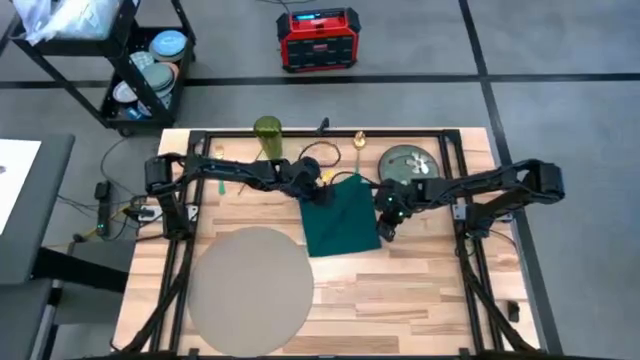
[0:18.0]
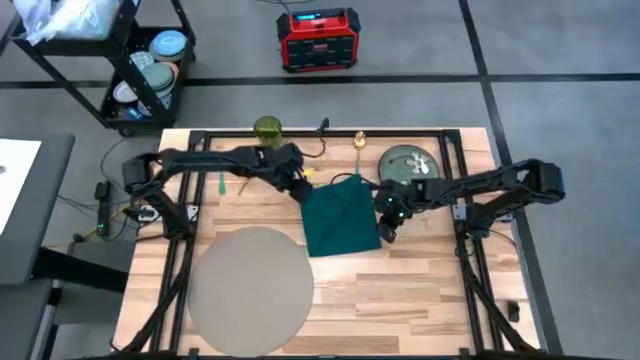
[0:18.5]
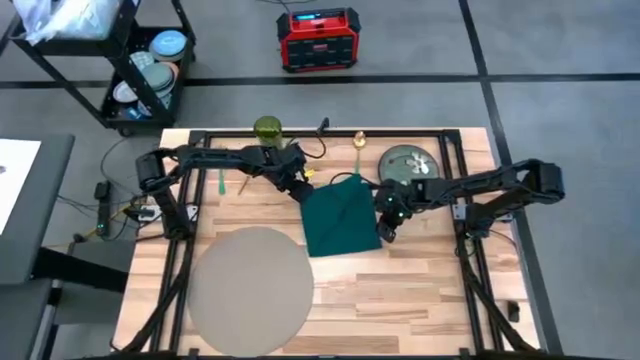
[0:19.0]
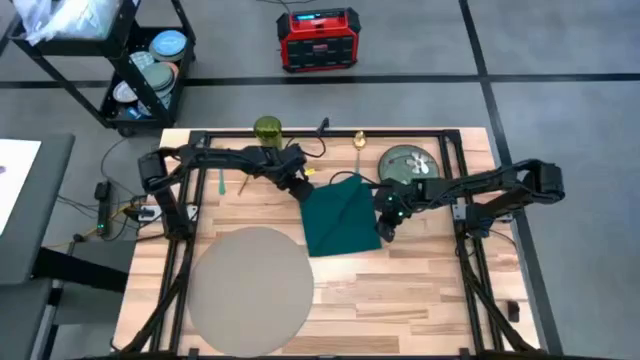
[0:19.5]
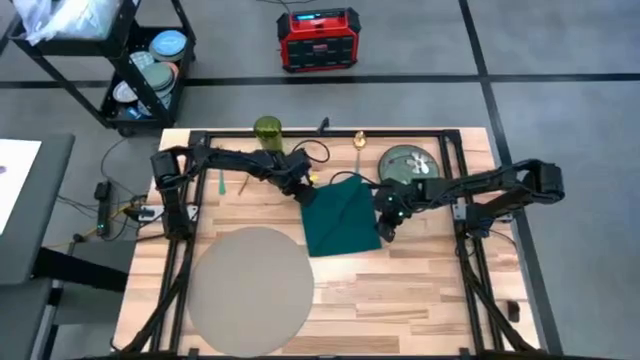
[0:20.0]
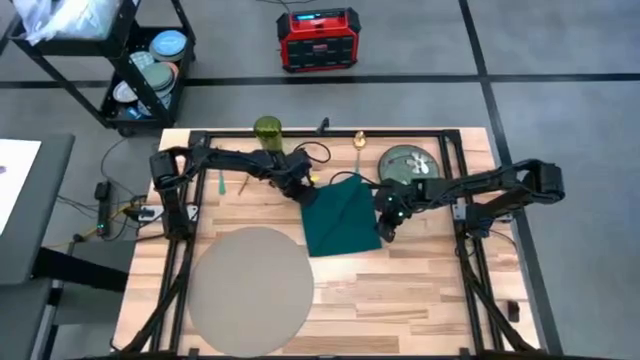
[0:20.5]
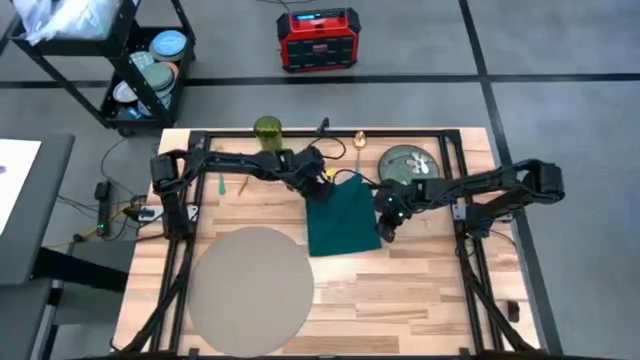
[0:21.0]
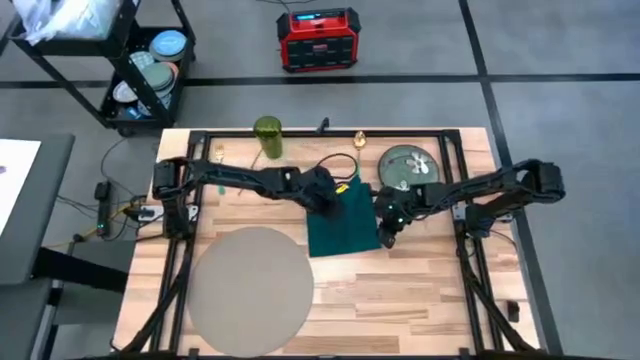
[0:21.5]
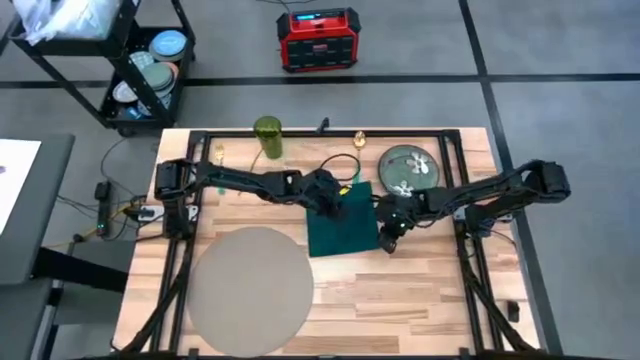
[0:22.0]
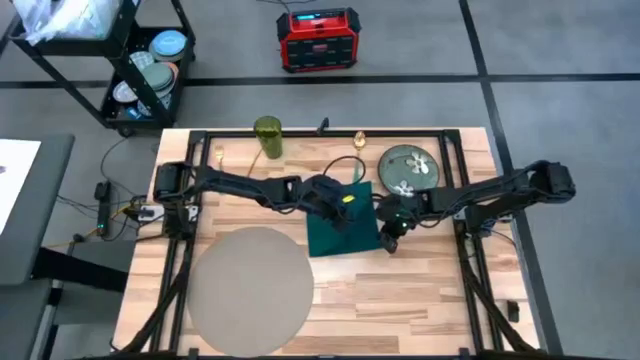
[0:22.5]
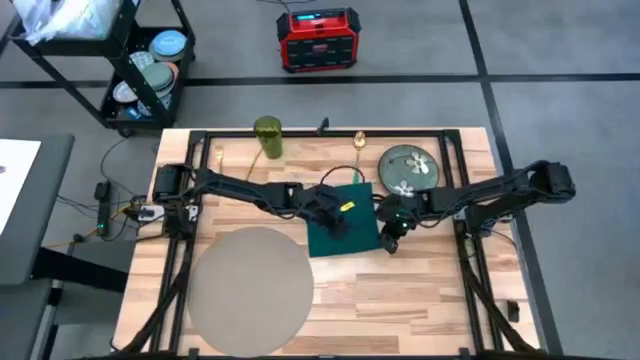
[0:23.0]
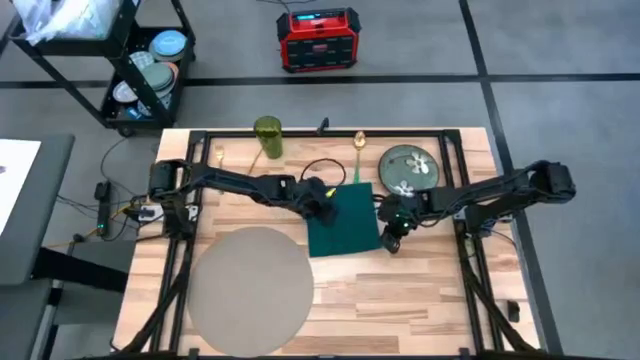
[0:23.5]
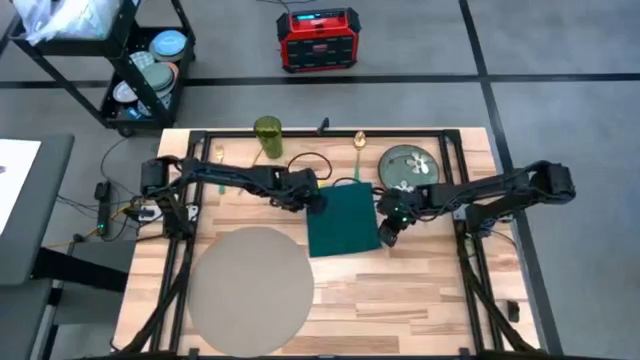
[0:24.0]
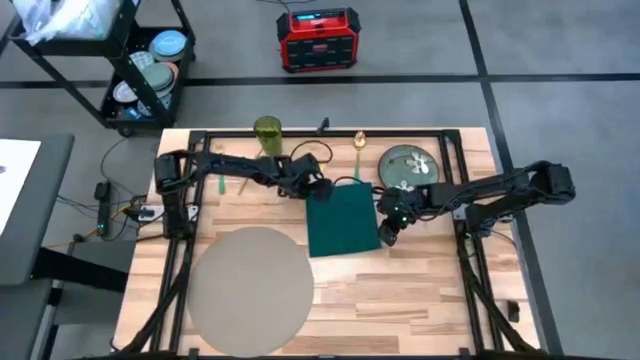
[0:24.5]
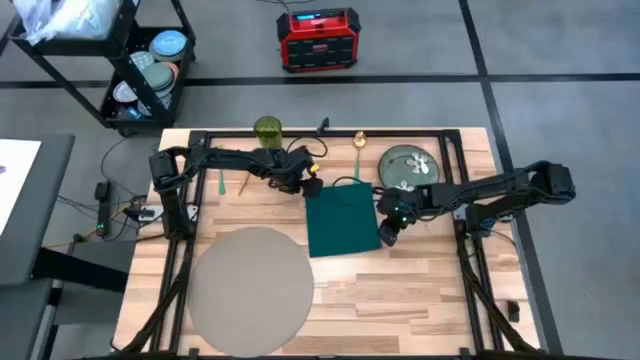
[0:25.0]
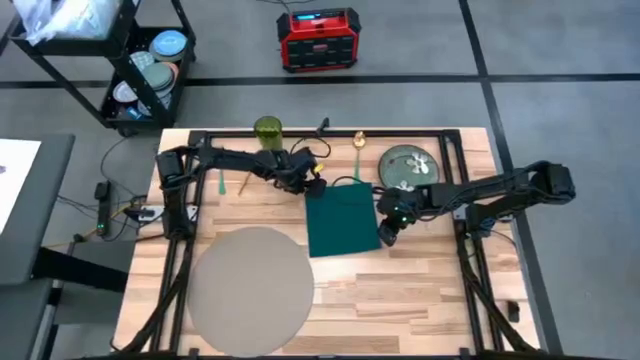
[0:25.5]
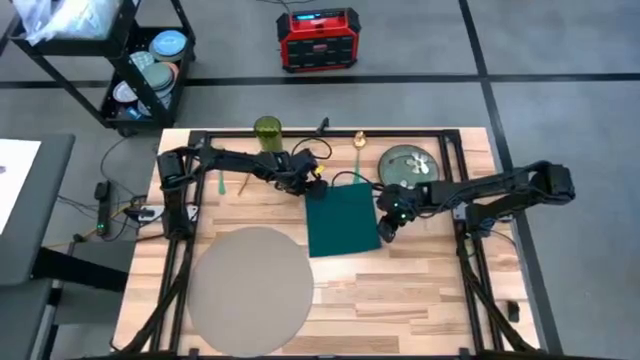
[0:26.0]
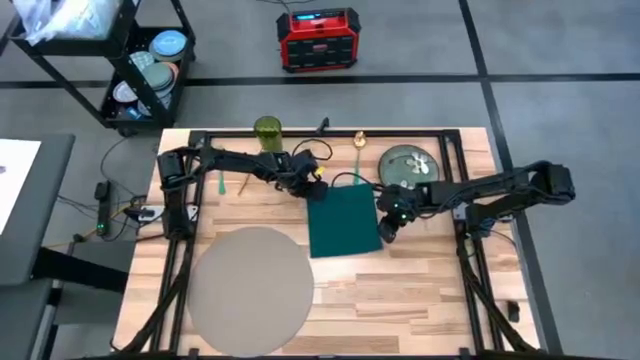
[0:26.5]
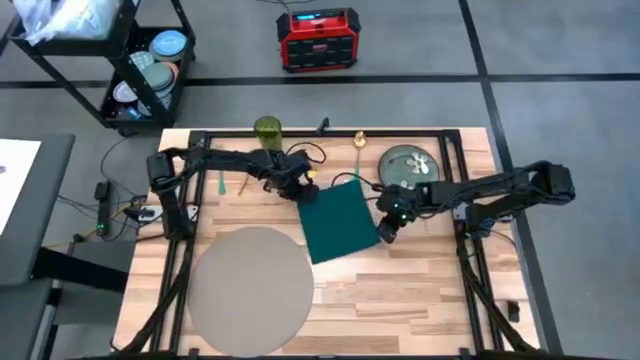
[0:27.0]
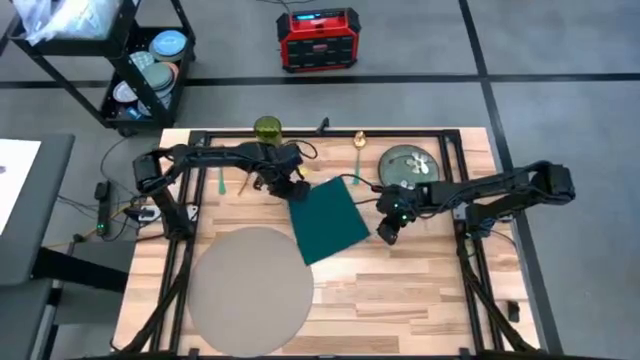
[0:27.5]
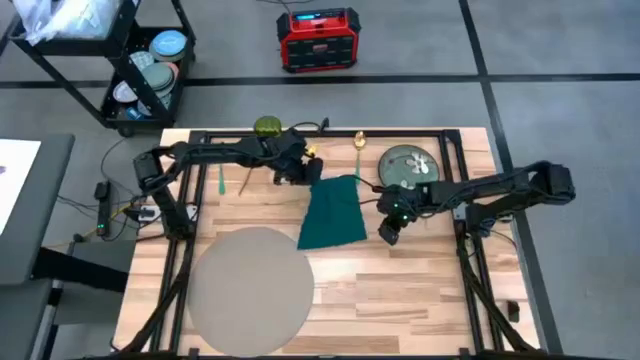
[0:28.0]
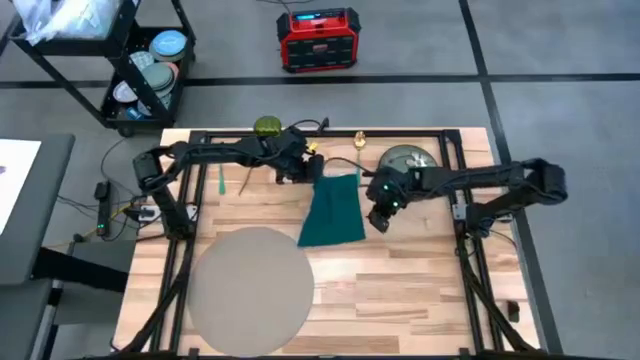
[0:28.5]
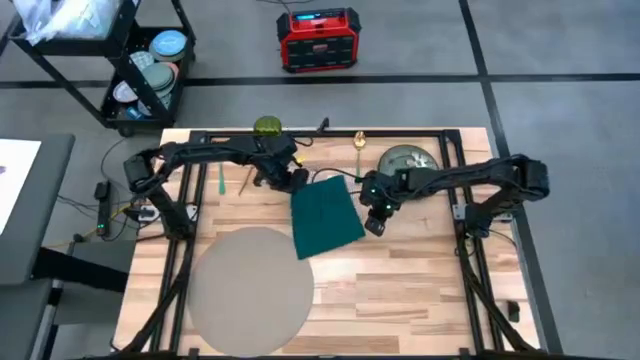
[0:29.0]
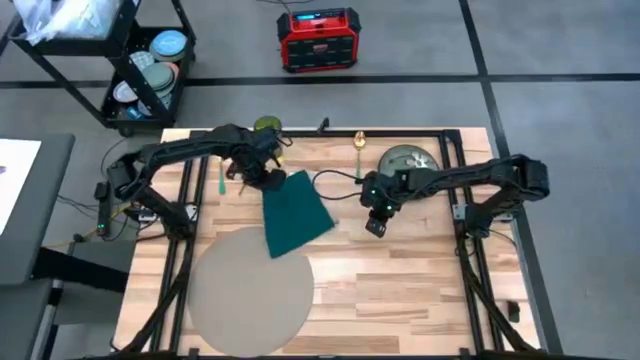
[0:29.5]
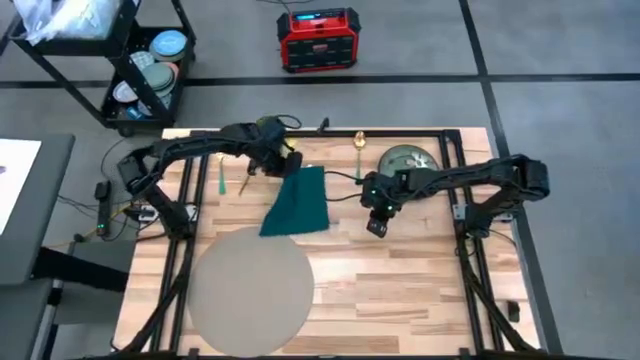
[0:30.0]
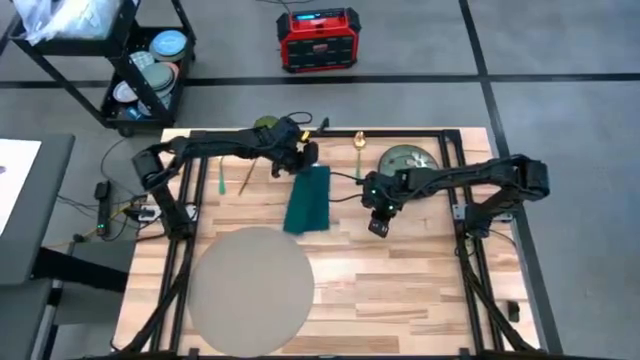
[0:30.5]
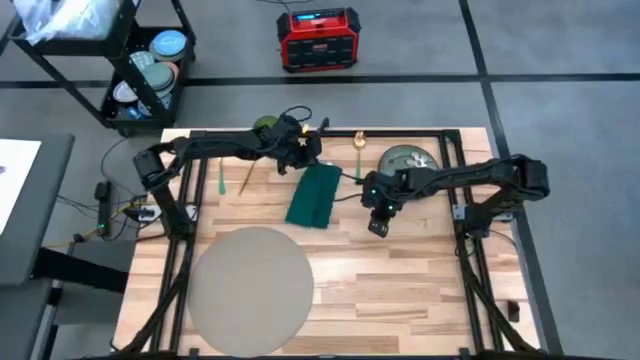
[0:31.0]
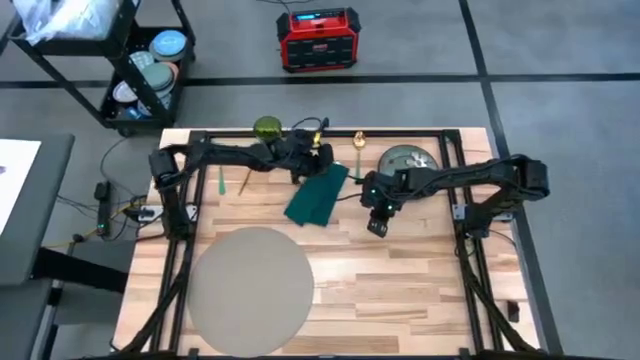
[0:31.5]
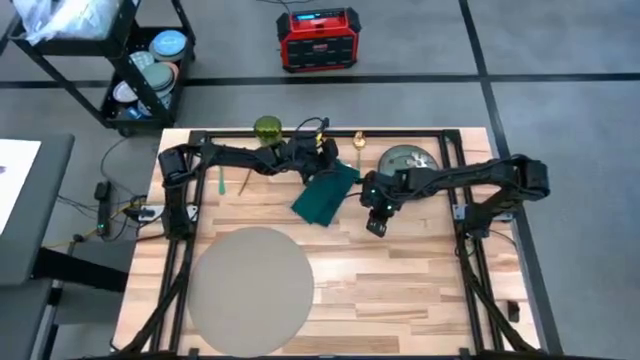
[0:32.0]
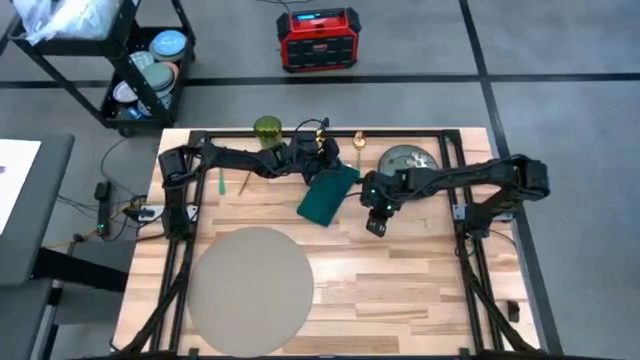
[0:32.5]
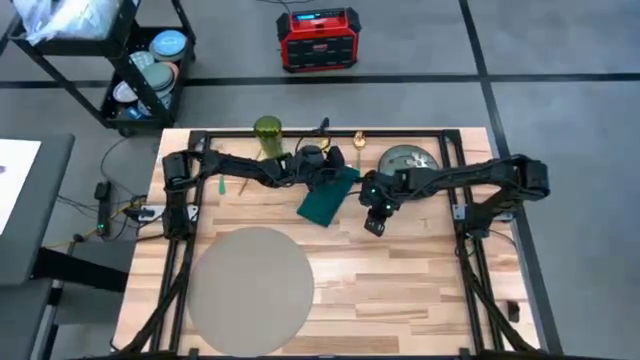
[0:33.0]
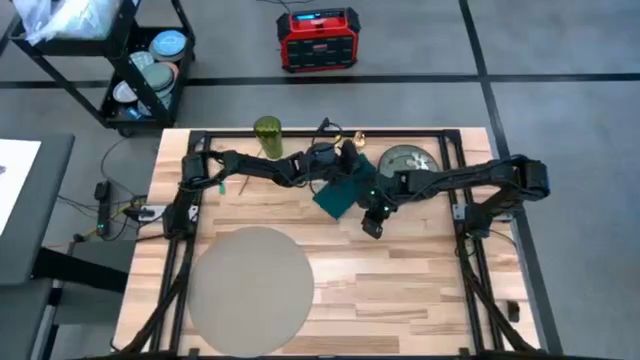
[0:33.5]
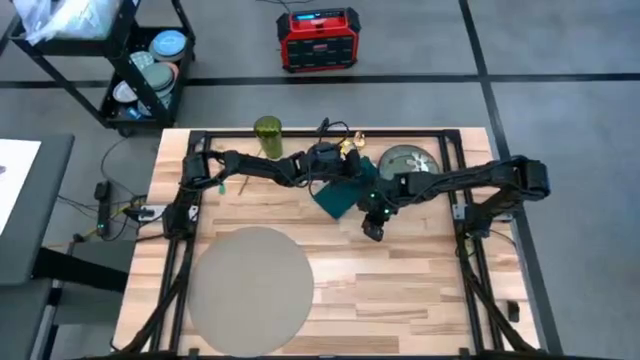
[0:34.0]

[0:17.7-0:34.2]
Task: Set table place
Fold the green napkin

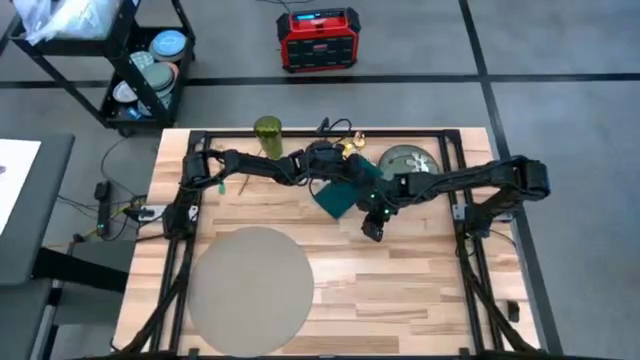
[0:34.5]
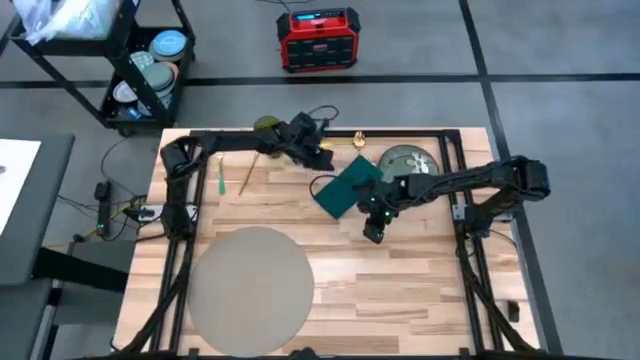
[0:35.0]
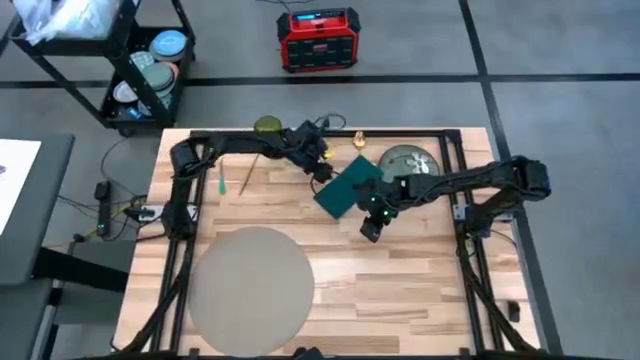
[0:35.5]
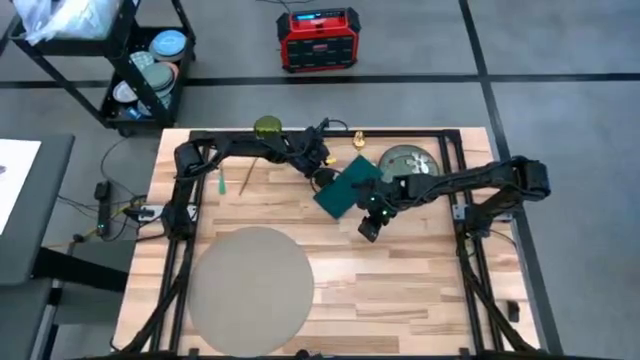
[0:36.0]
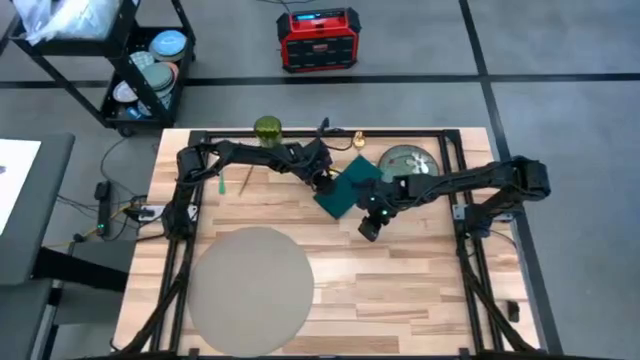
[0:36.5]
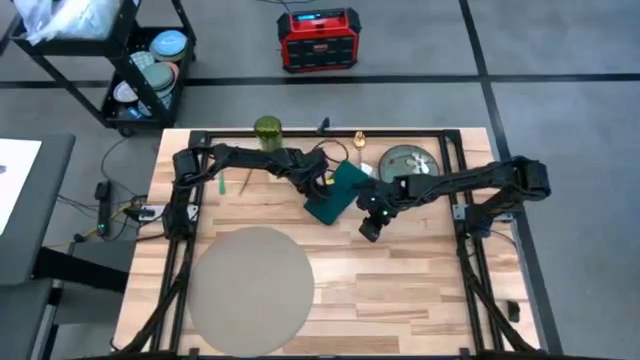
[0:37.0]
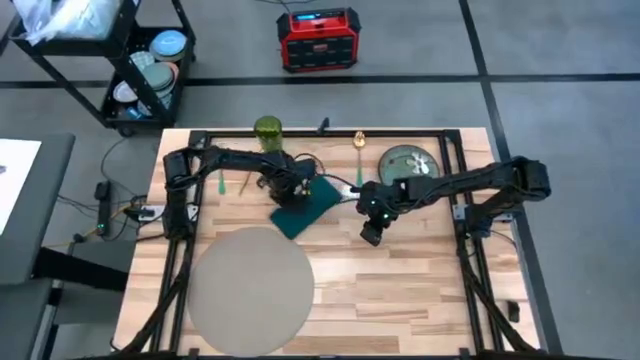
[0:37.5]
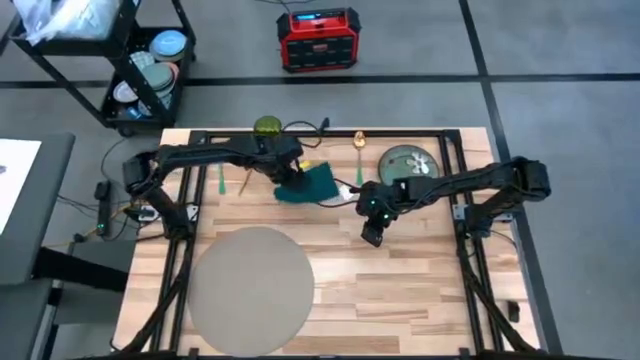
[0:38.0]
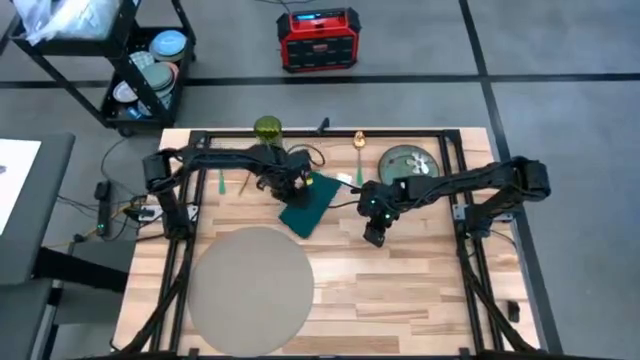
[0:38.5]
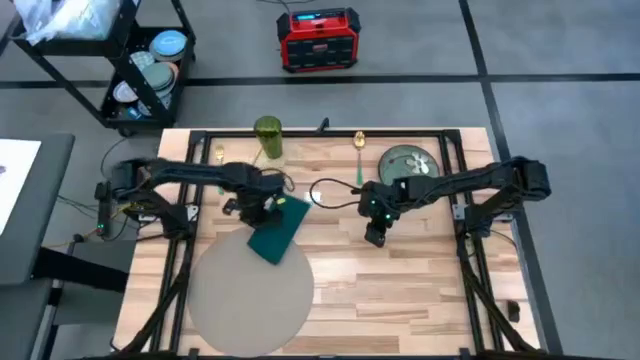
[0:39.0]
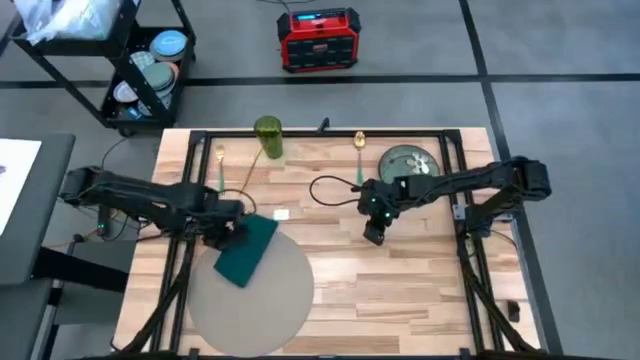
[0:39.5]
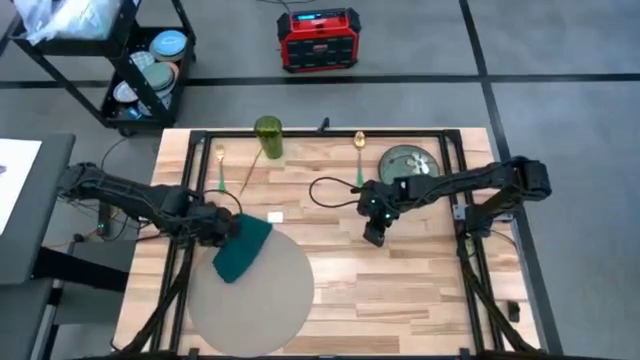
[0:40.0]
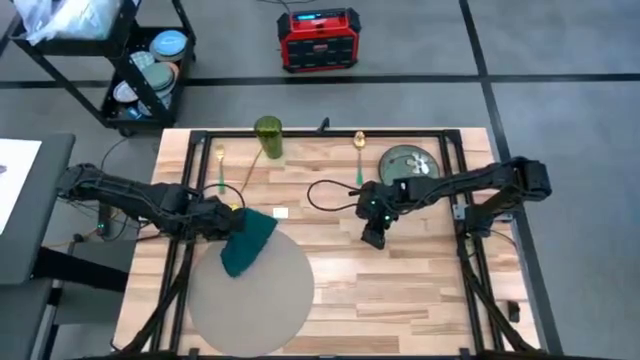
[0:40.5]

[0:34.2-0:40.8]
Put the green napkin on the gray mat
